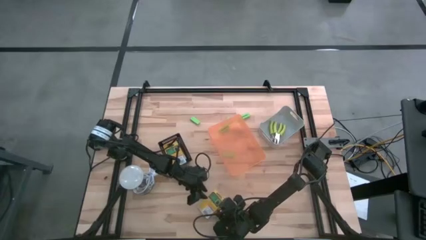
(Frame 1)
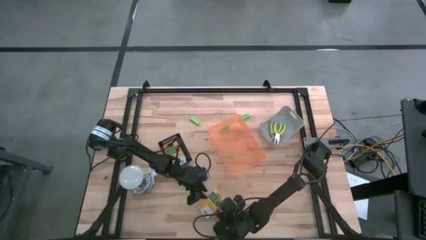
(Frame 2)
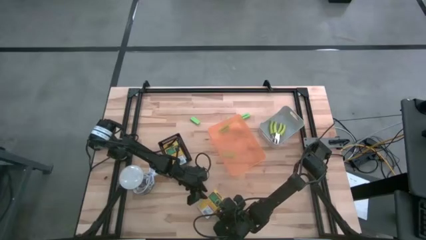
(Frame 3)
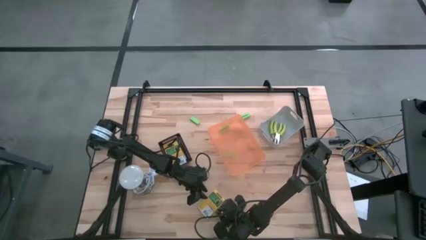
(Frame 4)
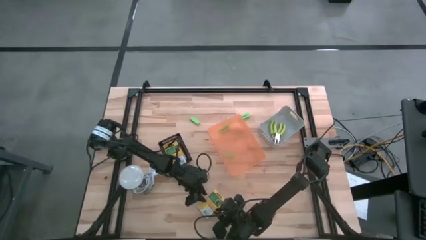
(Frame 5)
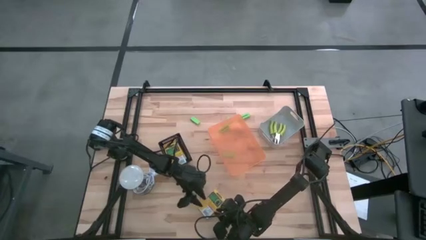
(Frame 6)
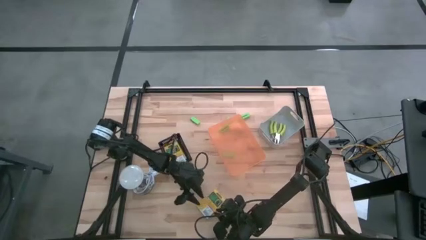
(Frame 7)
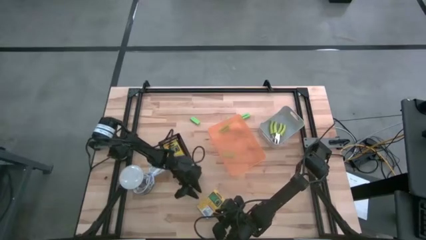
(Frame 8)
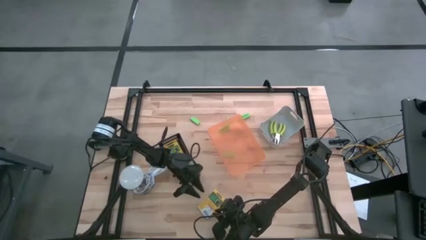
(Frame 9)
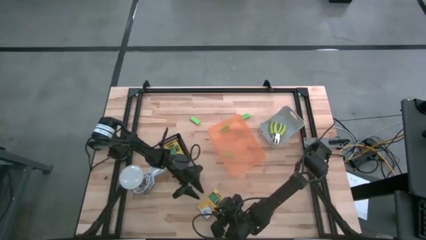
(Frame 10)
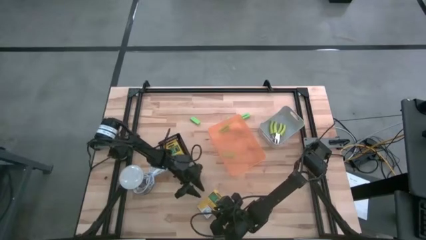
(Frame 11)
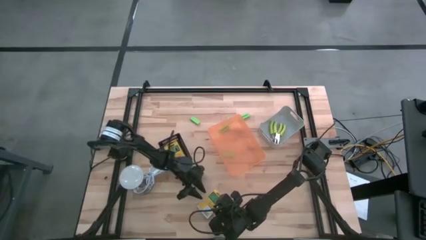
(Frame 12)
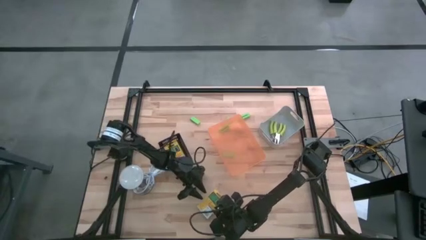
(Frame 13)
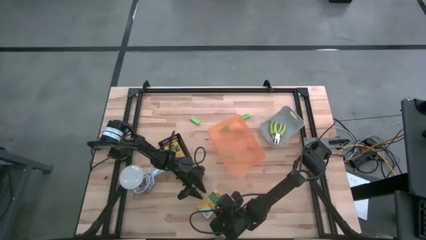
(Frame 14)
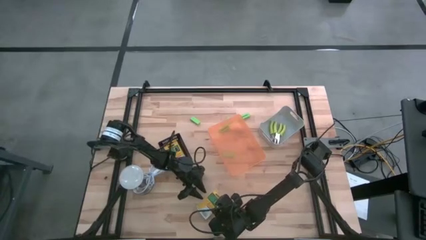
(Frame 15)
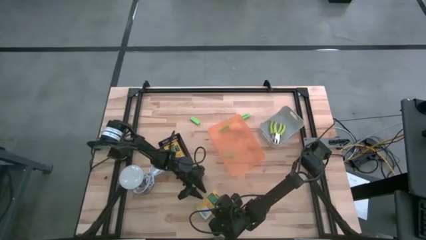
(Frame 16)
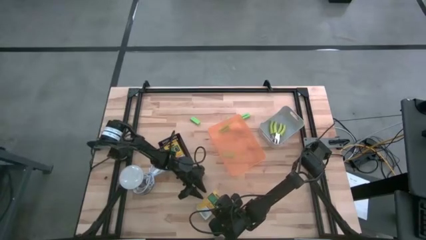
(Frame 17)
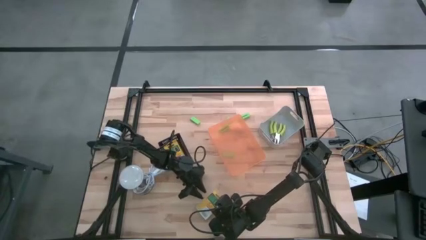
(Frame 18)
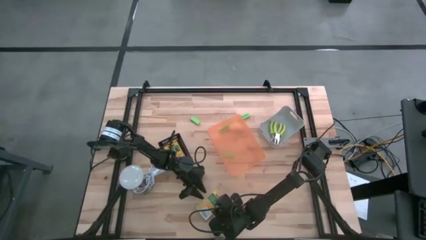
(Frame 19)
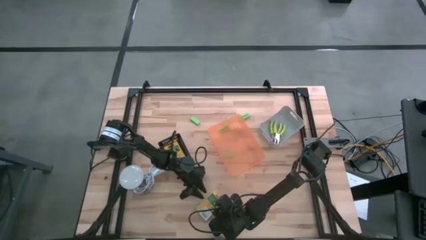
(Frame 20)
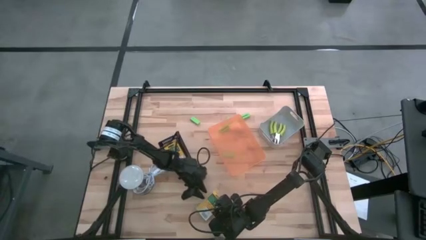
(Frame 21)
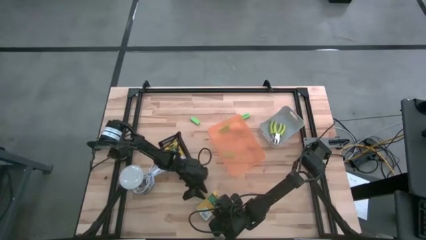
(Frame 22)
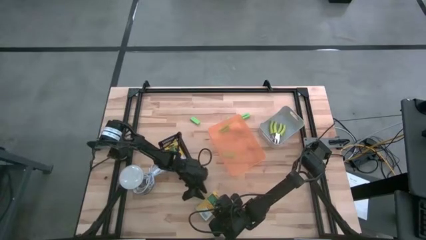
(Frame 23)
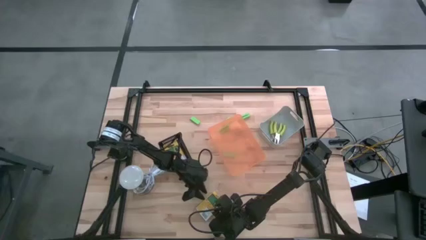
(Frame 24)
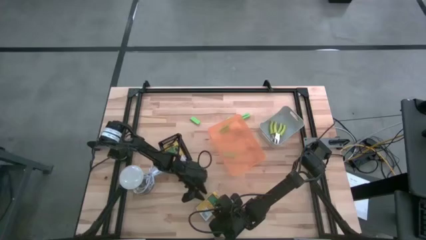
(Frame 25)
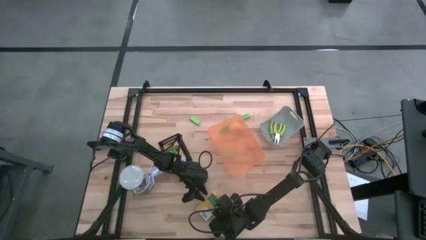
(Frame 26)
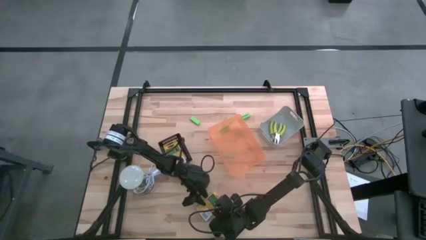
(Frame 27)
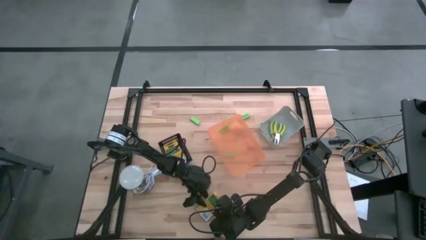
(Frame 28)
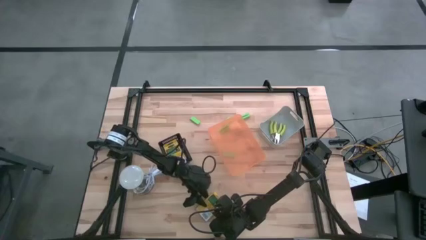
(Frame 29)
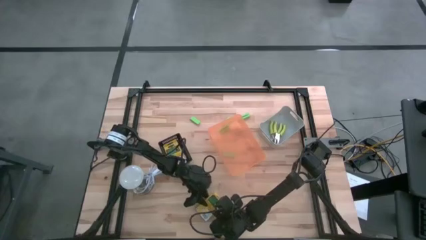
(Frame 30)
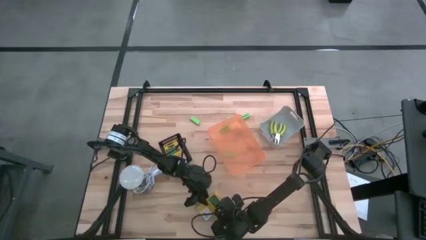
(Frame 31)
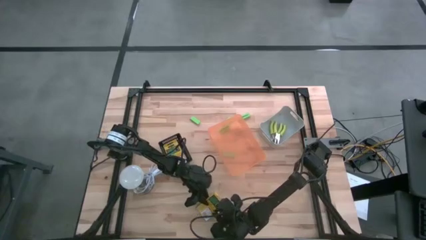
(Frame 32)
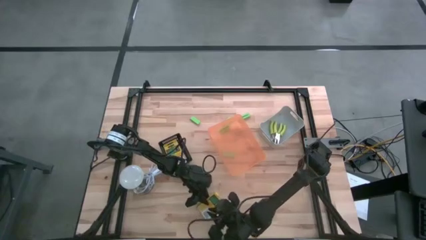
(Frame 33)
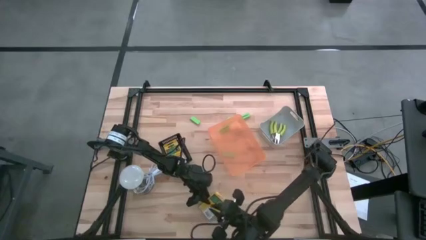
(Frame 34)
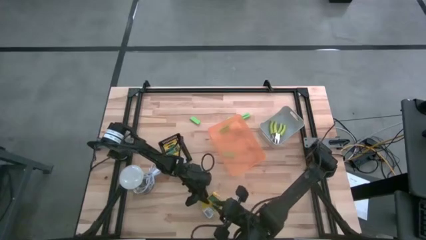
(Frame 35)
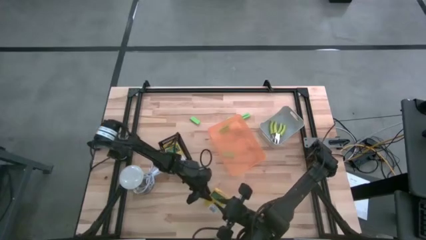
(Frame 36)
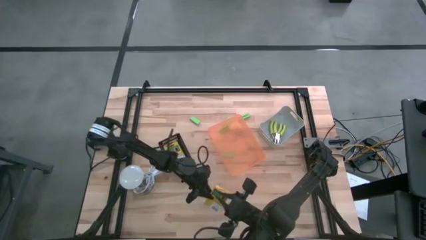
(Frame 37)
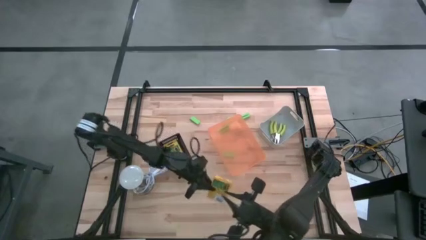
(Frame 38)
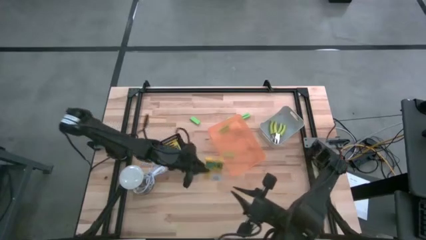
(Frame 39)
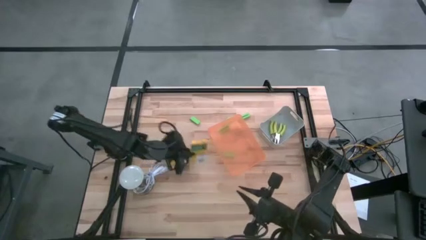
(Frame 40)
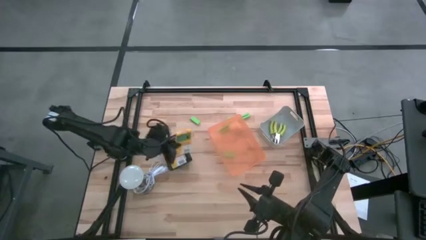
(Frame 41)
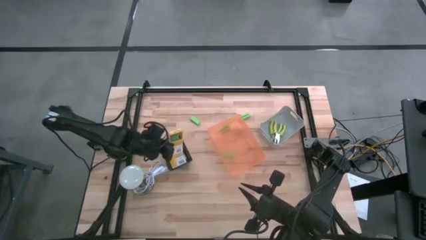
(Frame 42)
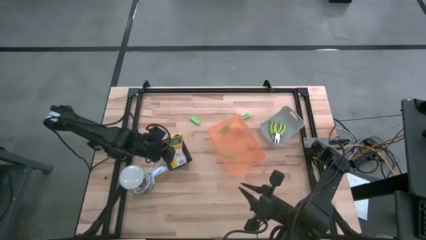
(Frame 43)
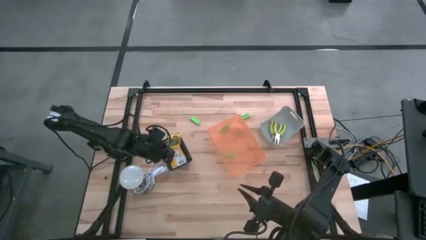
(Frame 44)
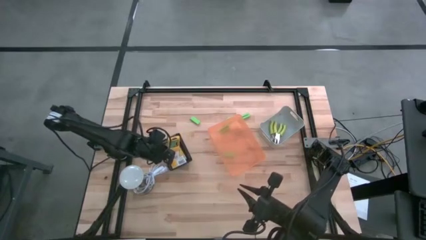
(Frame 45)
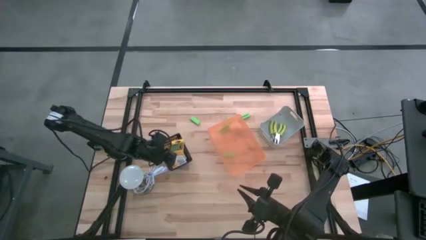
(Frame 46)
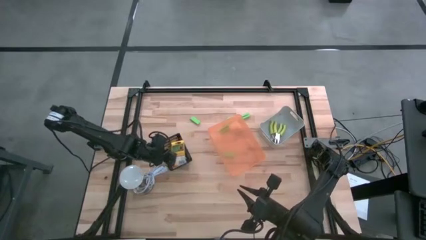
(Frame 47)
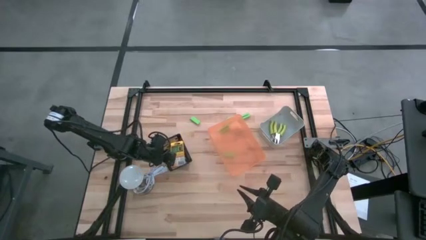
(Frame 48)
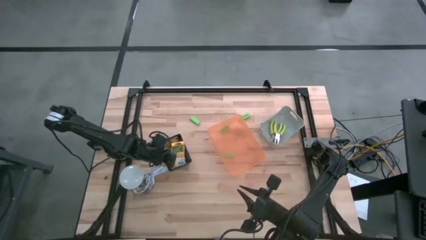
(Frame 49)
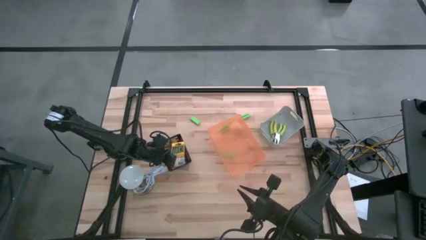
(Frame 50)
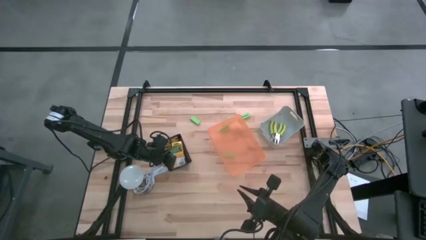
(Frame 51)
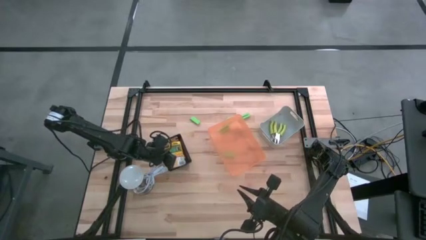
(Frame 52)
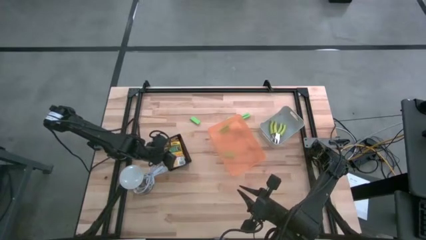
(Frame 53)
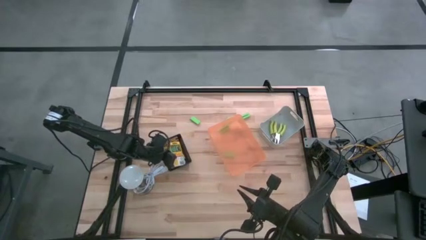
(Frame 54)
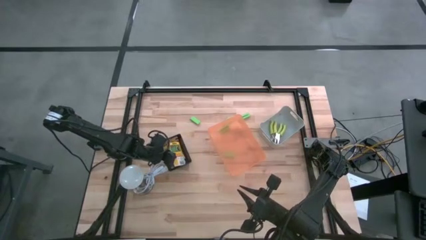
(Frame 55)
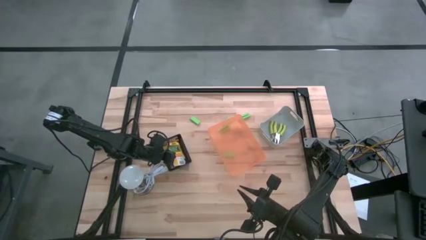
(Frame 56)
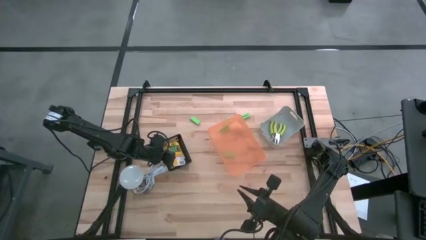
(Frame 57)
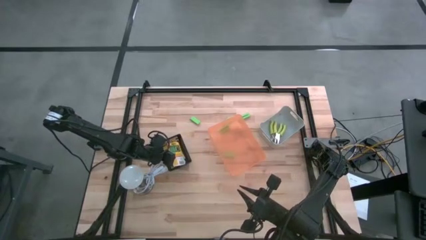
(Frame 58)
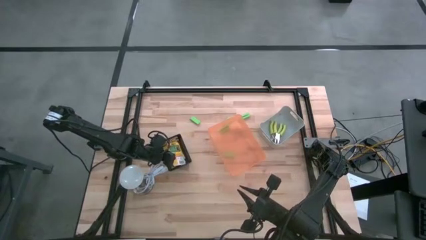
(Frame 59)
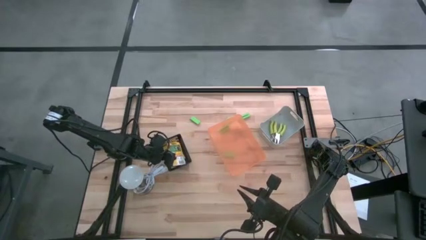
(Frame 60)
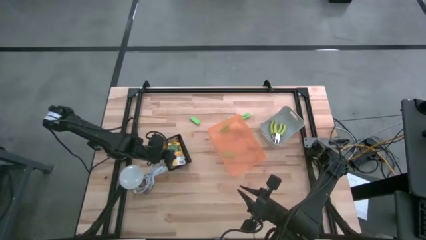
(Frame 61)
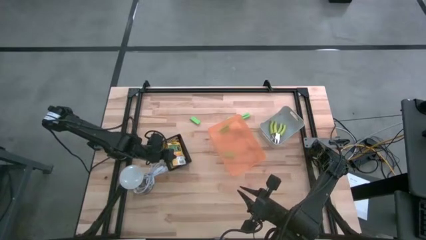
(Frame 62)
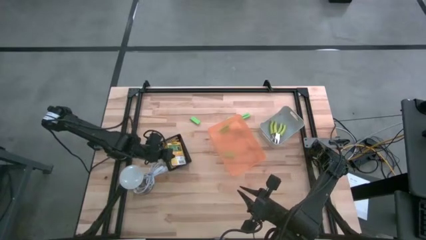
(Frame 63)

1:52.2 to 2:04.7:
Task: Pick & Place School Supplies
Put the yellow crayon box into the black bin

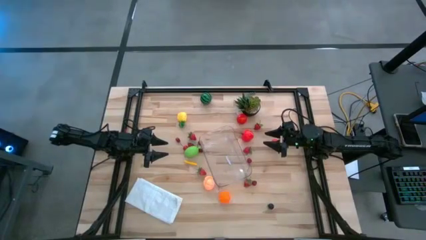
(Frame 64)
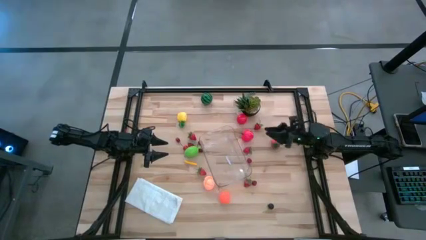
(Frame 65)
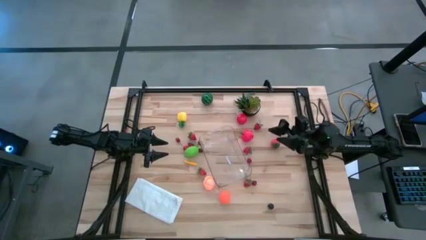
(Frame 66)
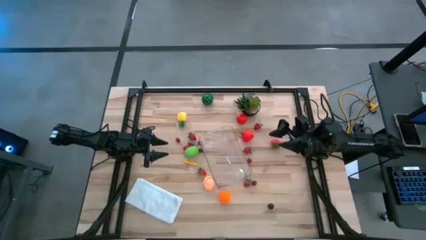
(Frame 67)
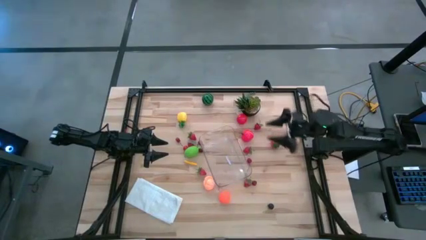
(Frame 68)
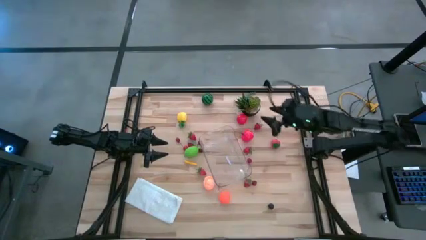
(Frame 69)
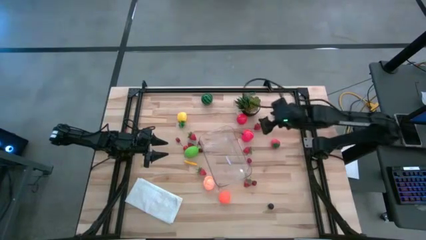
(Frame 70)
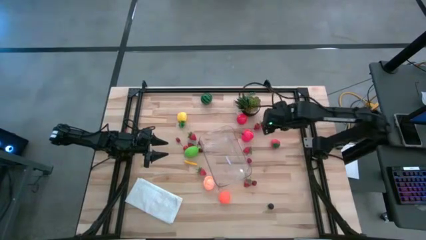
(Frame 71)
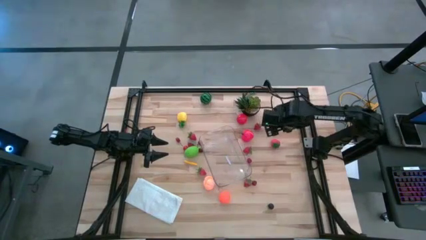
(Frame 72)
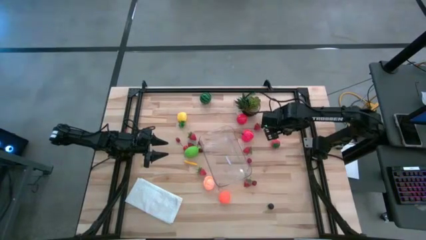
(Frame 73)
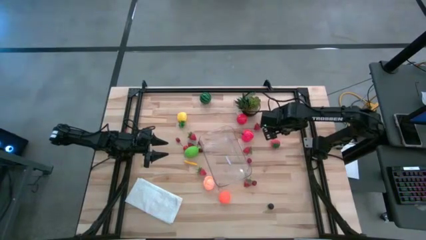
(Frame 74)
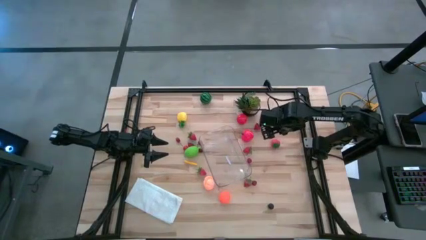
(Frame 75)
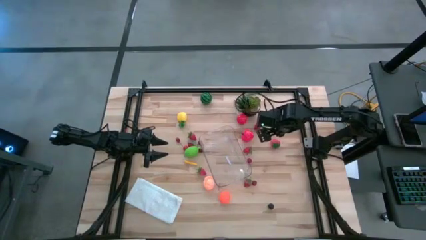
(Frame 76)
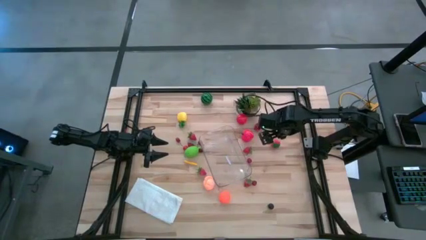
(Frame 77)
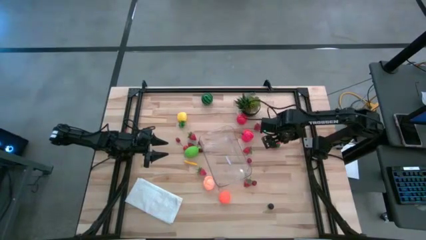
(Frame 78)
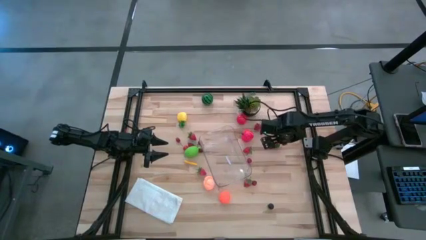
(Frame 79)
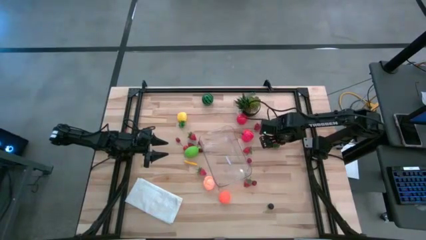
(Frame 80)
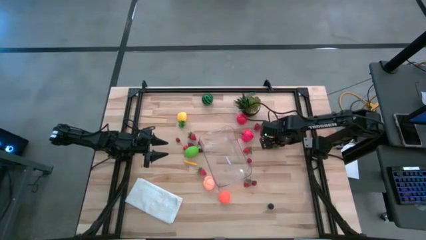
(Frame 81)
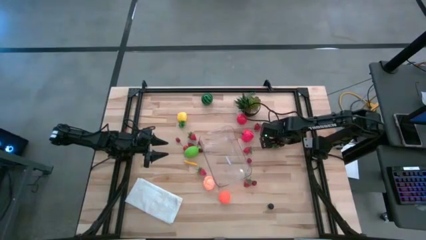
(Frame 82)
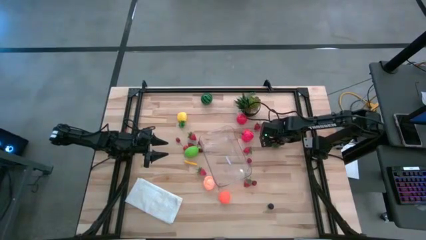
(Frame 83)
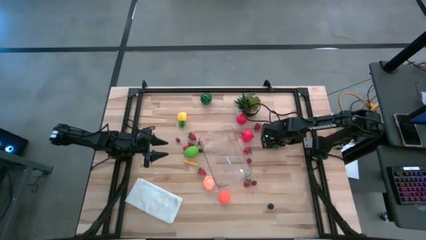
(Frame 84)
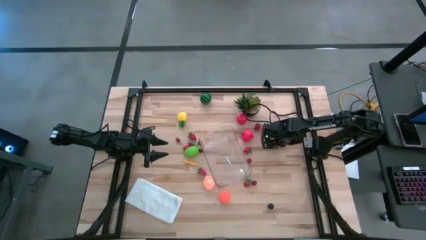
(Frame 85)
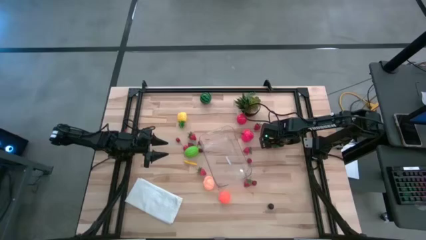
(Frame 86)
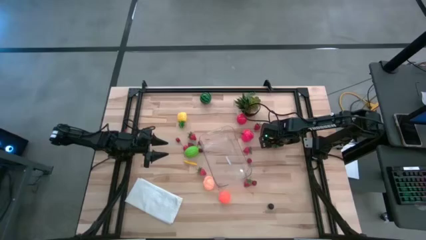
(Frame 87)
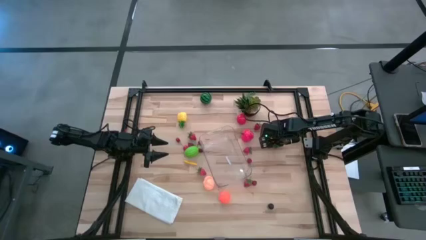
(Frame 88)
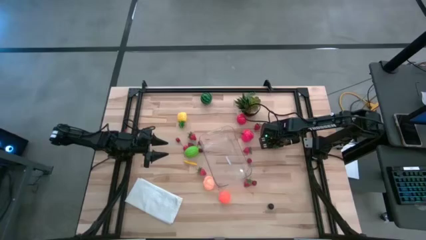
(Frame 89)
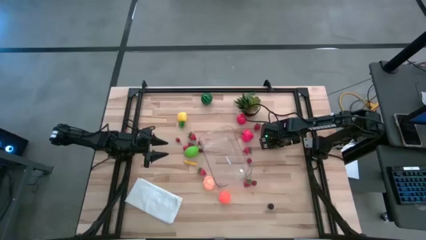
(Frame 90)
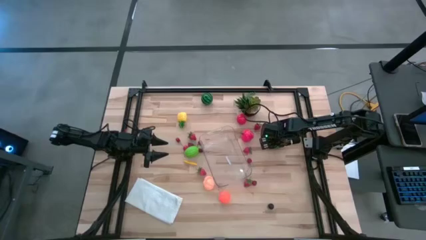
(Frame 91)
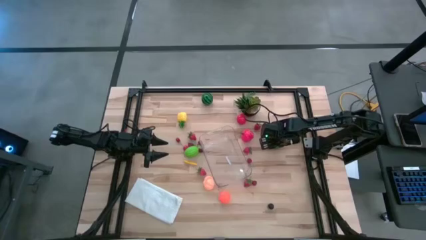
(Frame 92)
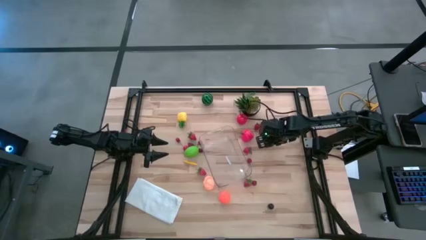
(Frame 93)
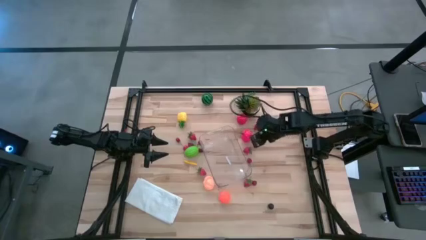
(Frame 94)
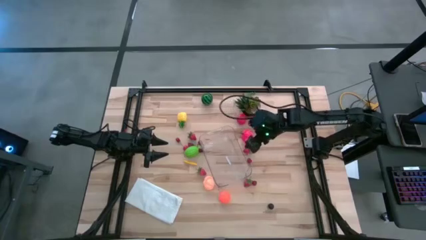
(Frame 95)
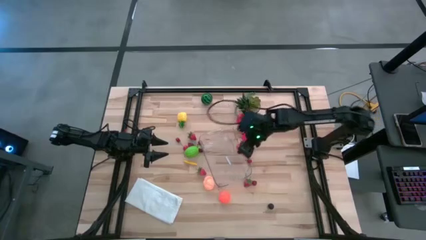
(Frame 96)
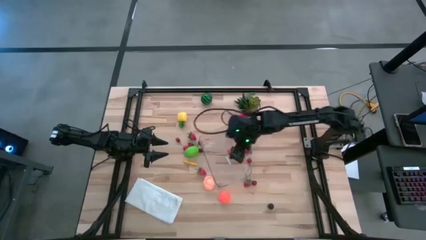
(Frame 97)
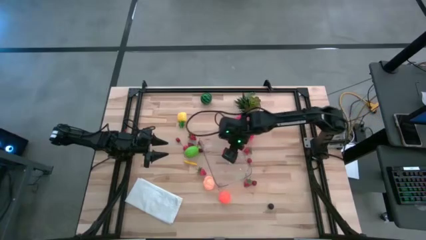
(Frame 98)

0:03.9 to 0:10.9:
Task: Pick and placing Produce into tupperware
Put the red strawberry into the transparent bin
